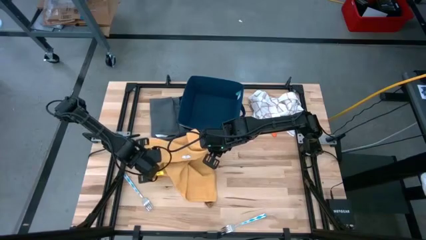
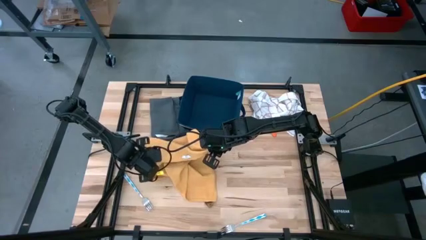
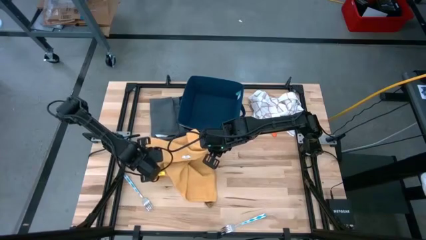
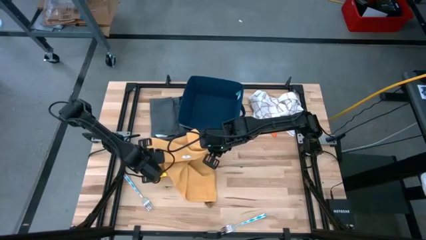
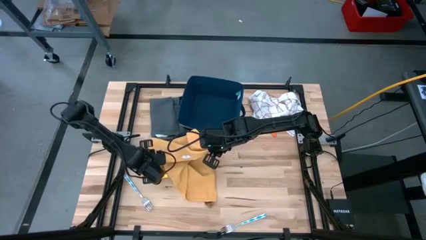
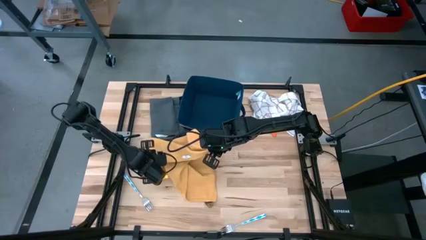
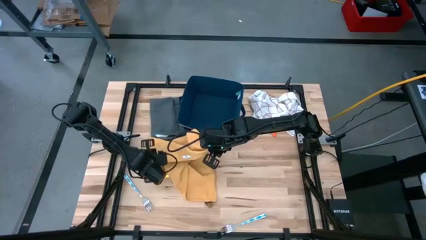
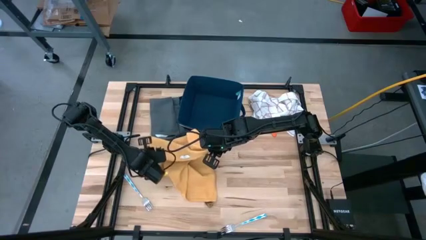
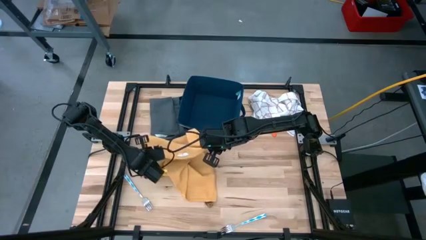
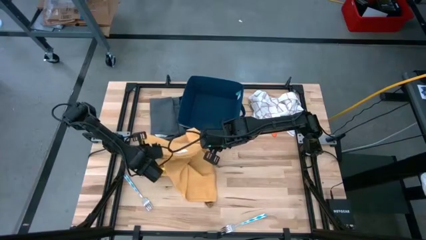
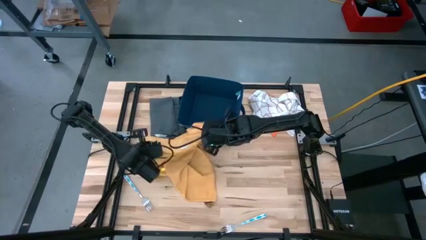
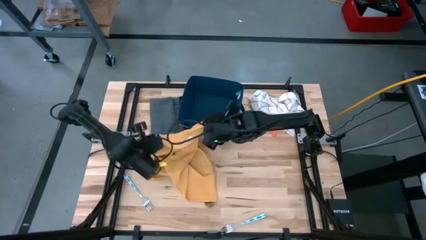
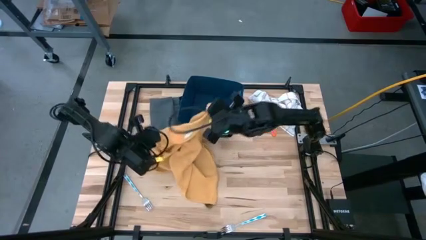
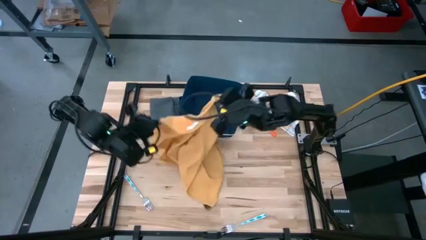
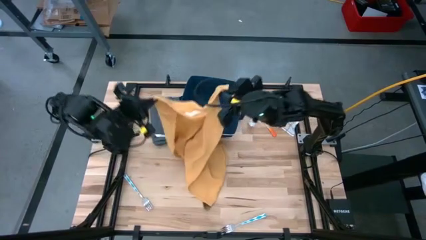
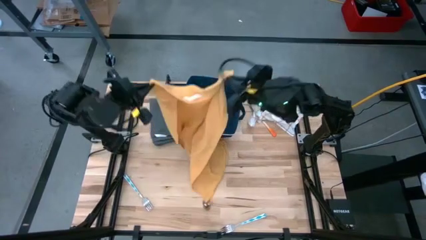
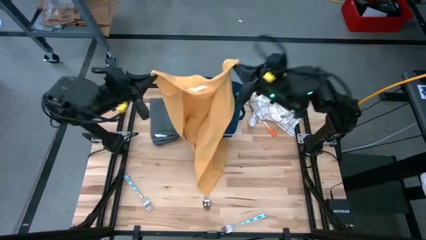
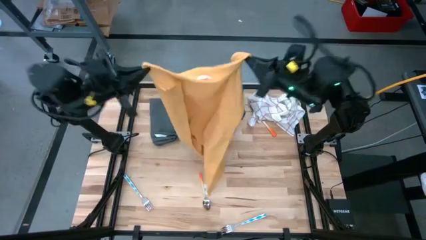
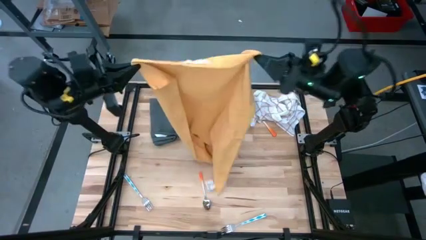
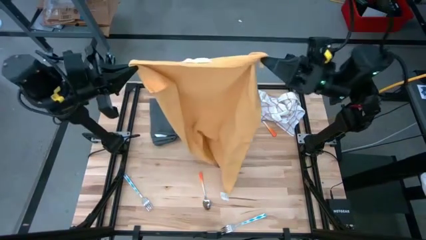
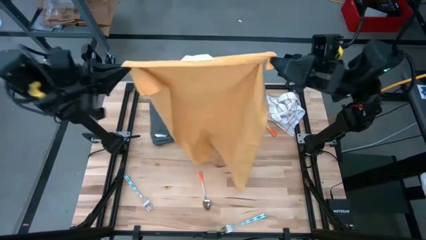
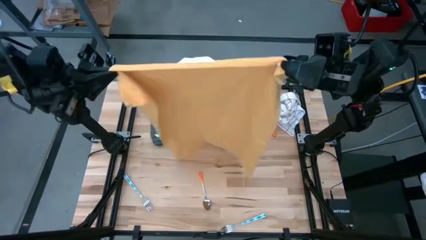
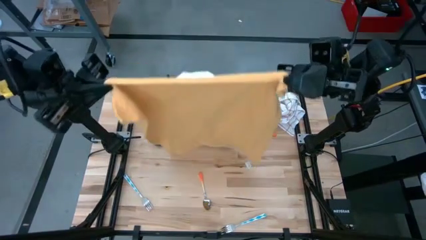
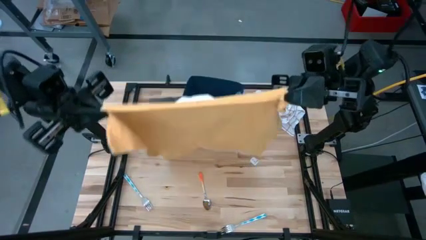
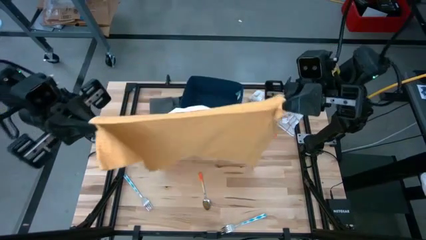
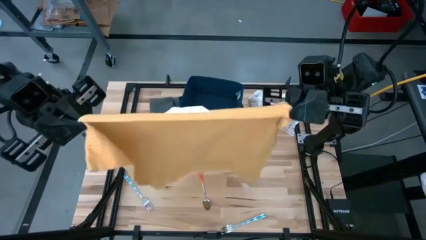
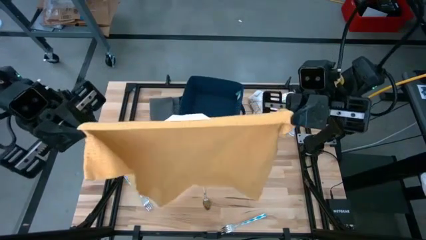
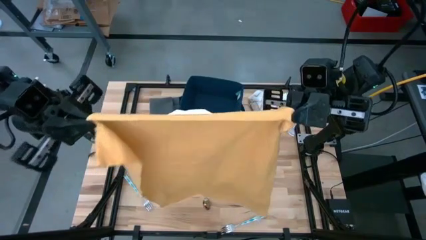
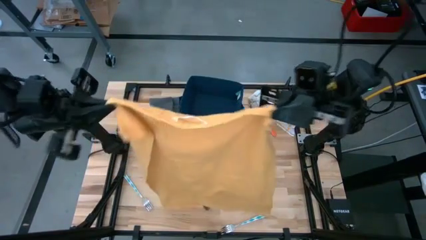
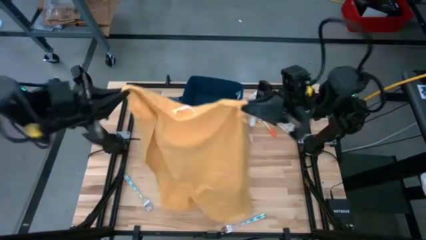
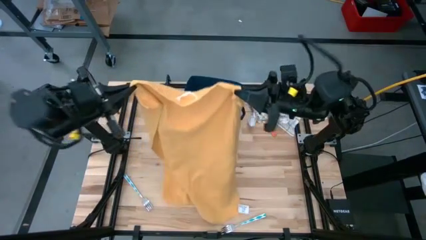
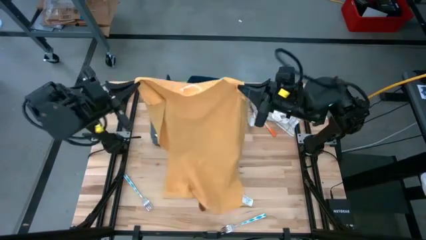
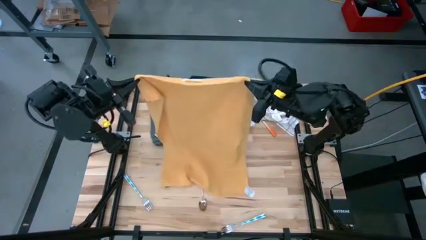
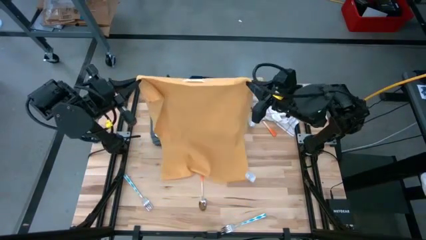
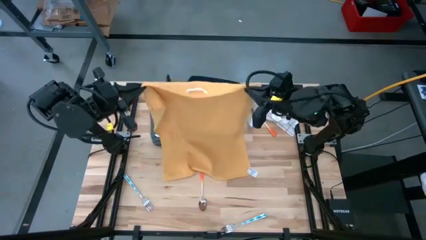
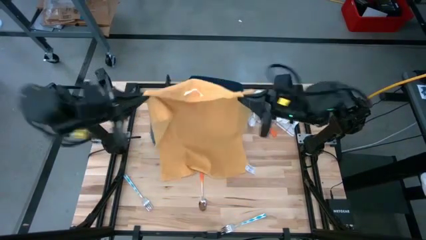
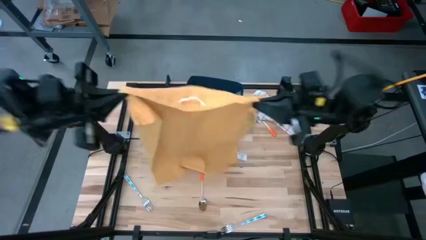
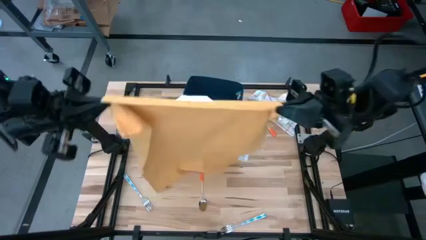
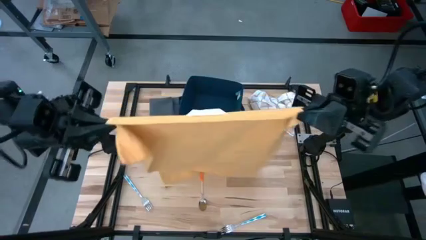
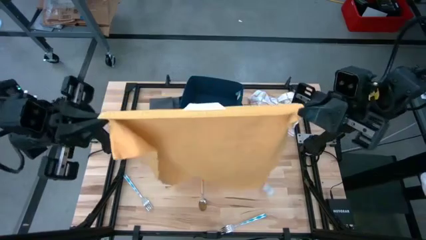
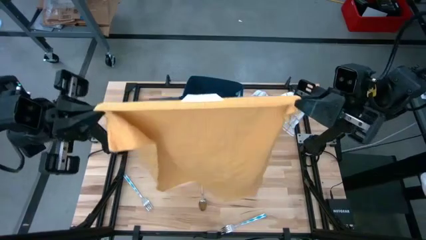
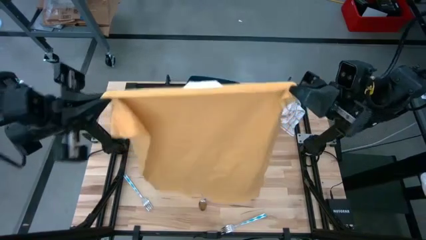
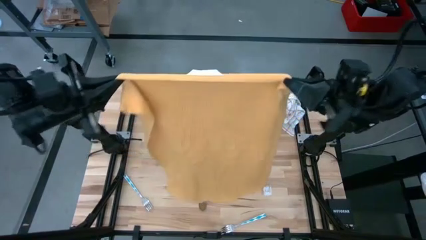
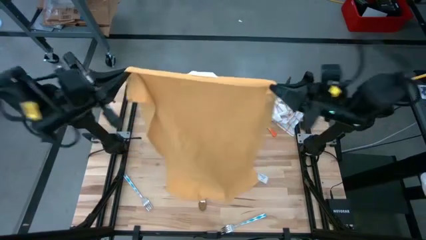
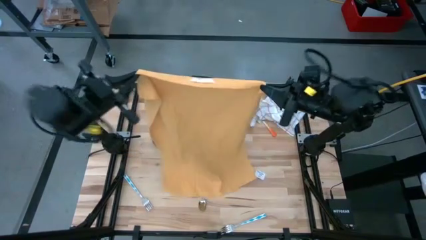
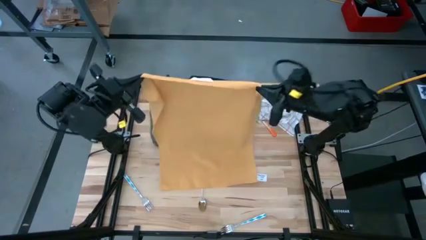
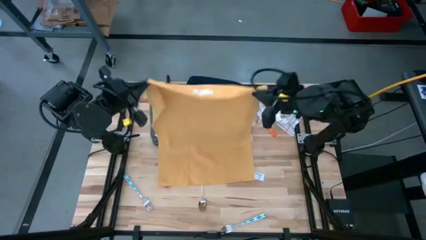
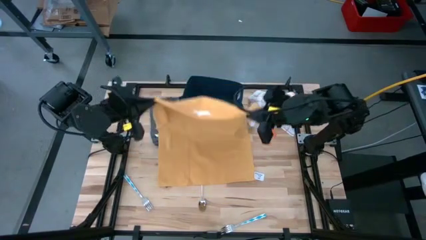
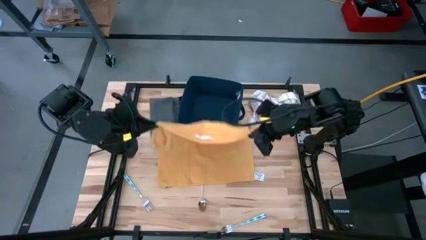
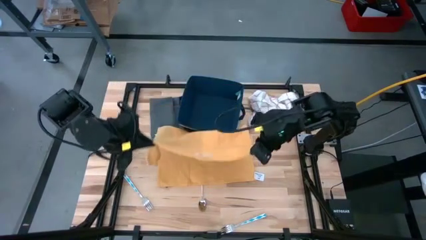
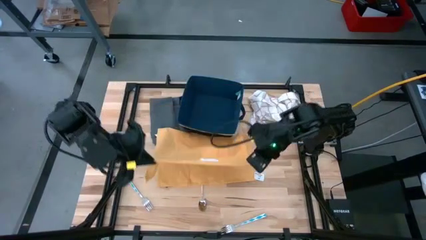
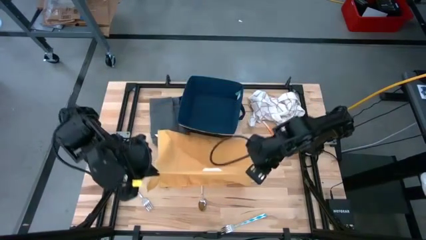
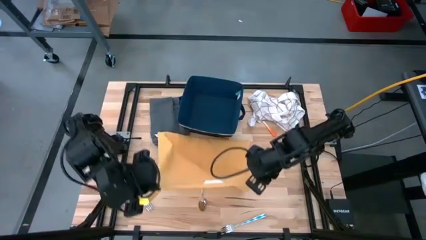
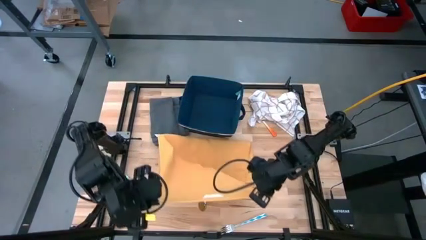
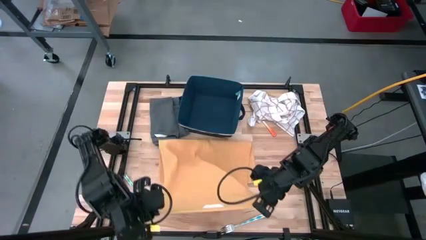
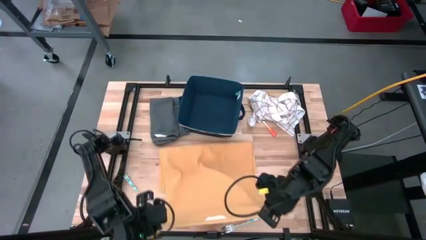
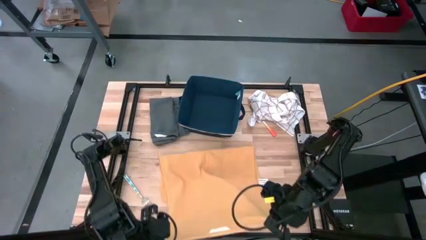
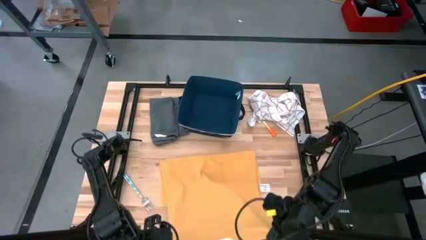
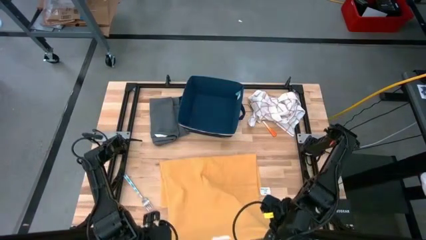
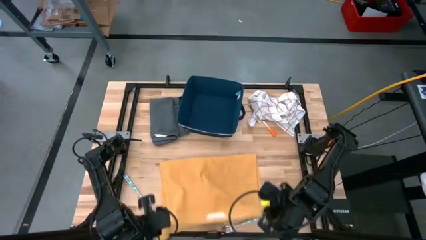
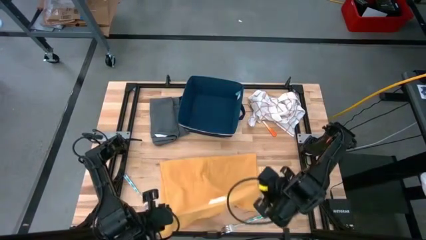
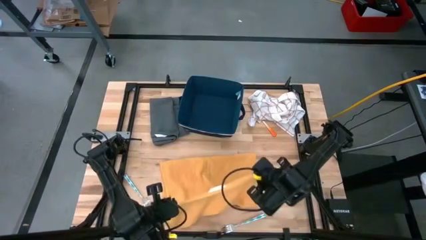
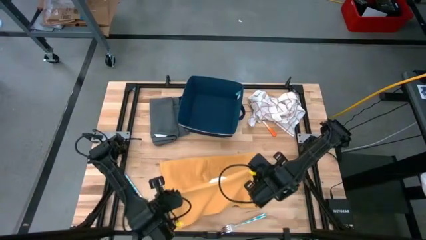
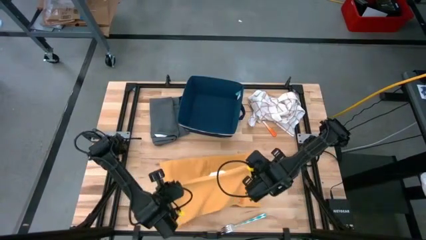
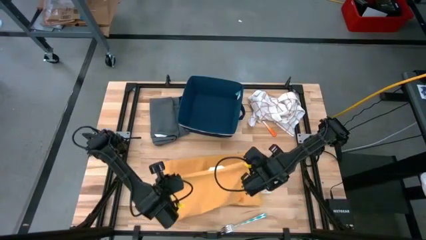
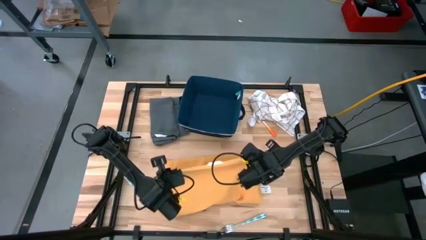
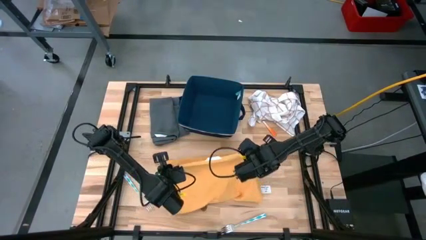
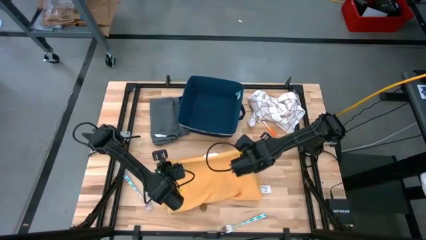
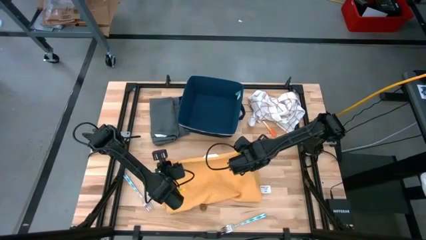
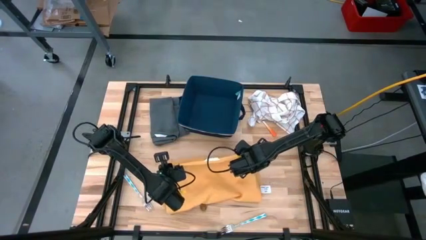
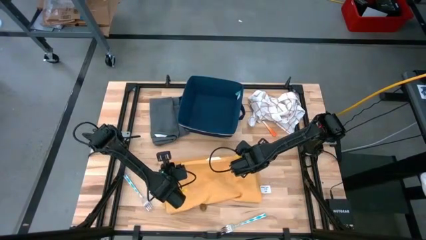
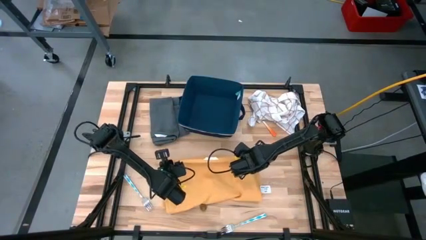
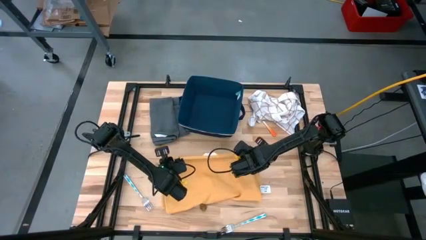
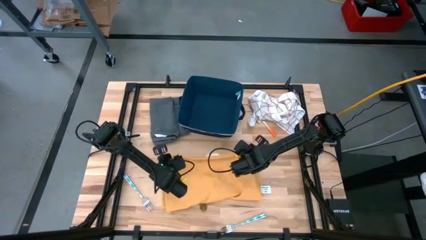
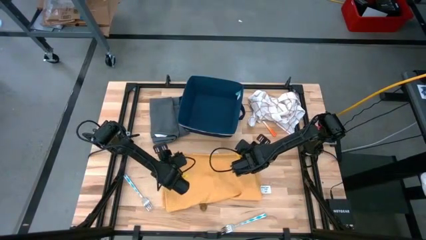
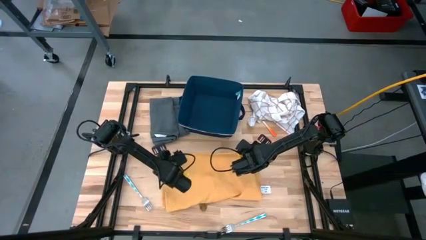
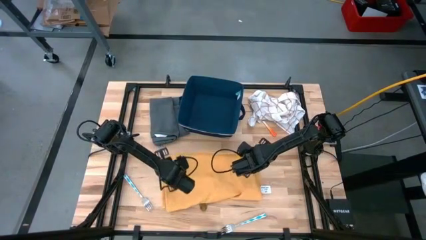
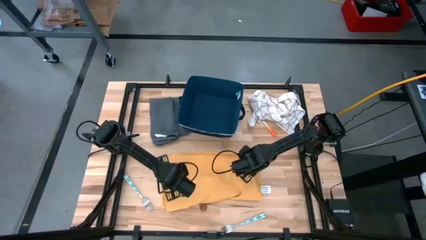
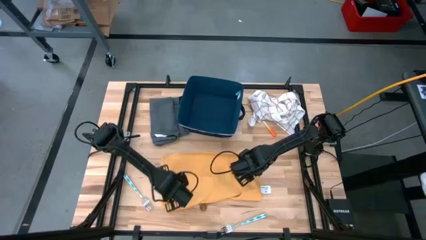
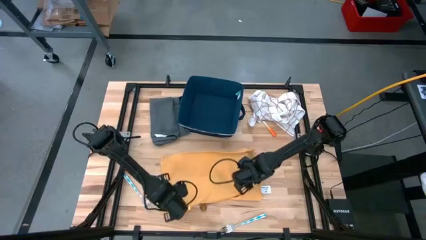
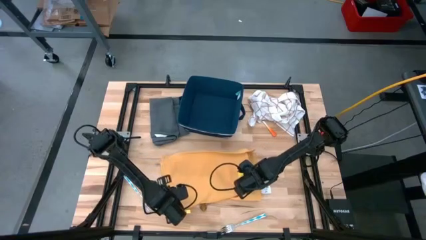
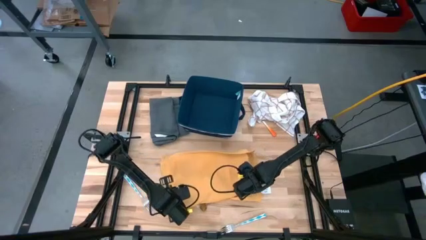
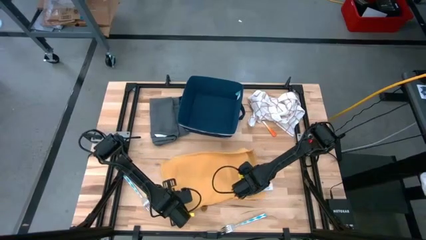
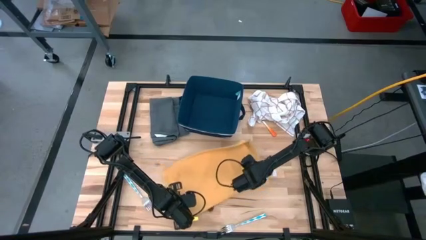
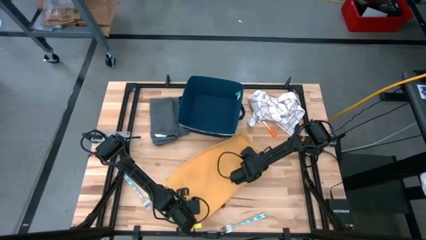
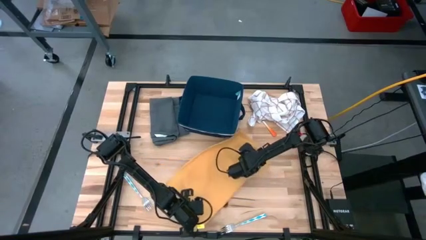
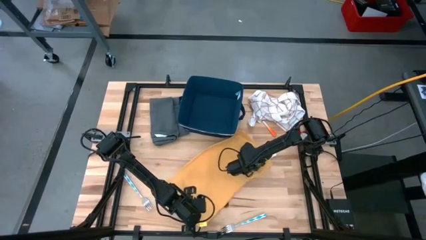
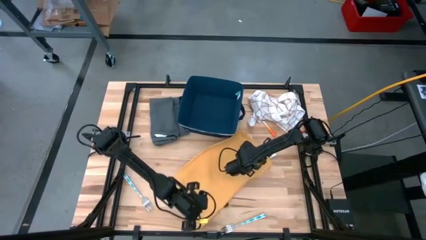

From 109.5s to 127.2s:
Task: Fold towel
Fold the yellow towel
